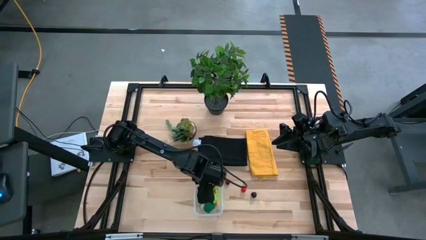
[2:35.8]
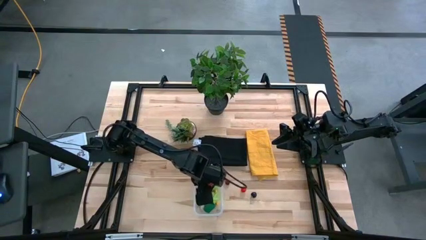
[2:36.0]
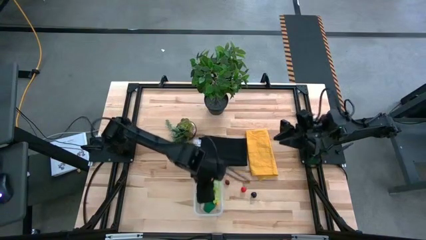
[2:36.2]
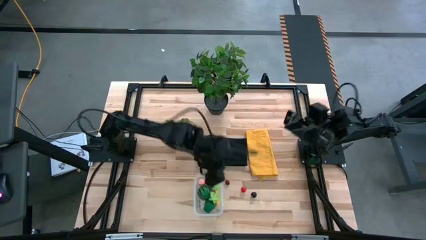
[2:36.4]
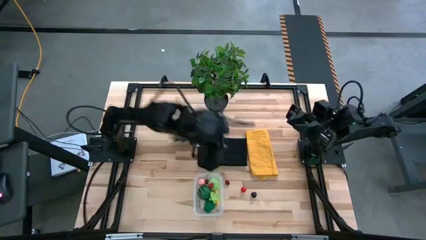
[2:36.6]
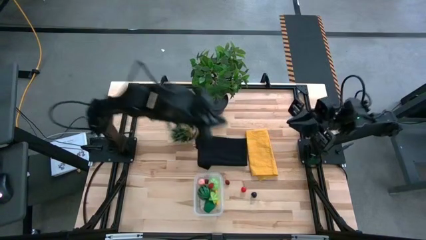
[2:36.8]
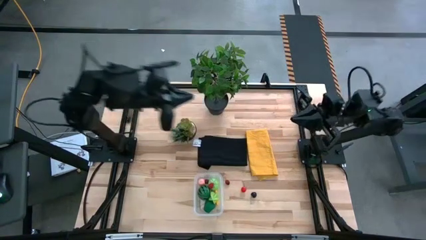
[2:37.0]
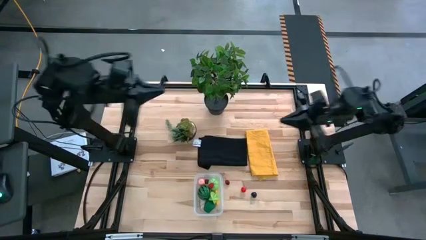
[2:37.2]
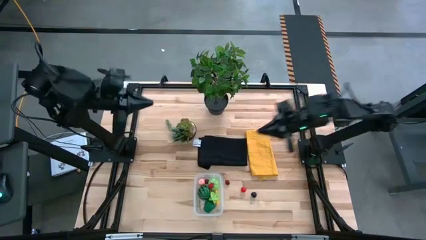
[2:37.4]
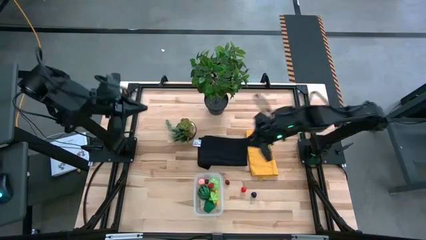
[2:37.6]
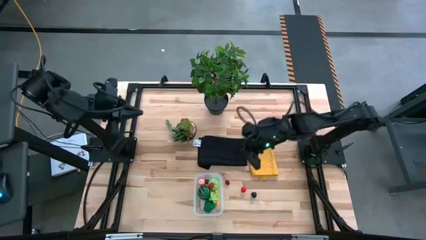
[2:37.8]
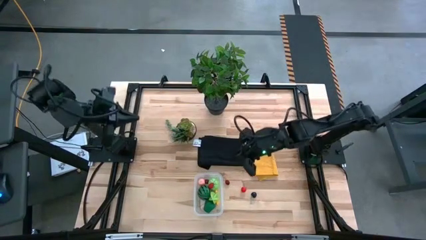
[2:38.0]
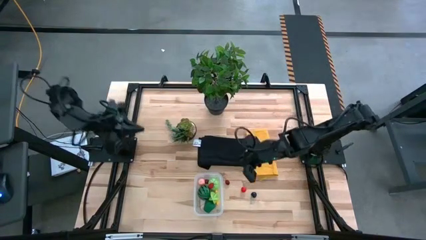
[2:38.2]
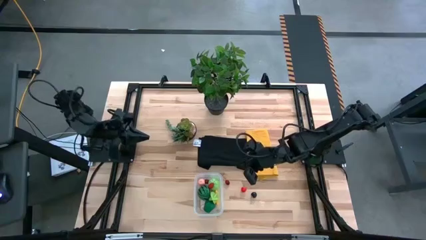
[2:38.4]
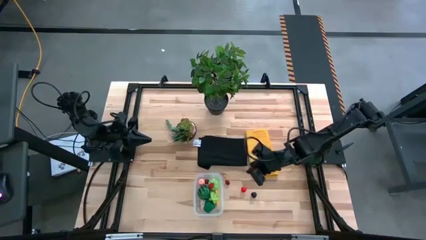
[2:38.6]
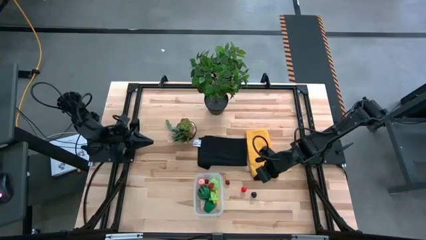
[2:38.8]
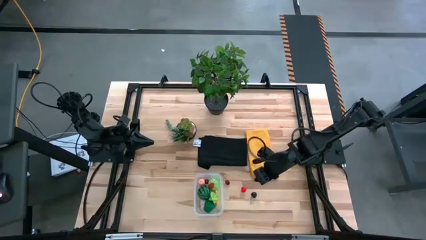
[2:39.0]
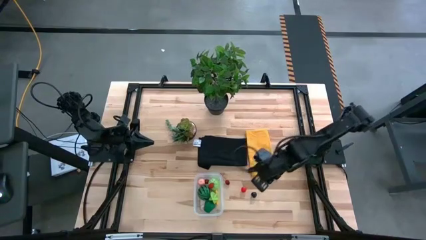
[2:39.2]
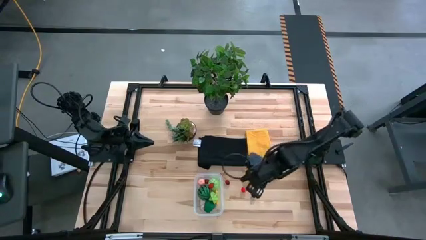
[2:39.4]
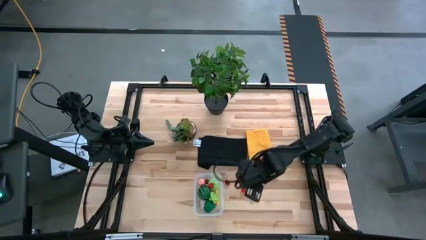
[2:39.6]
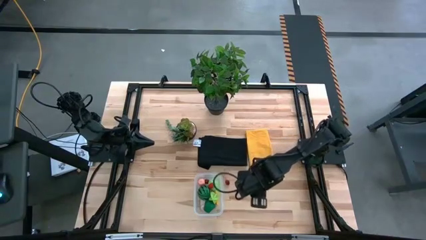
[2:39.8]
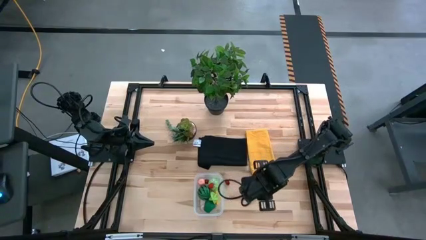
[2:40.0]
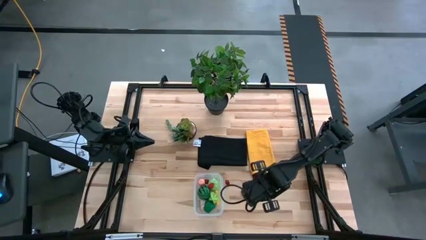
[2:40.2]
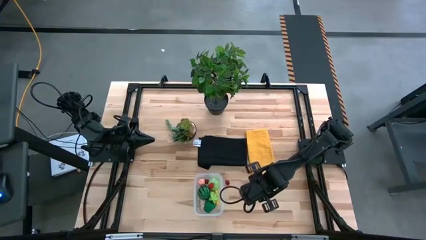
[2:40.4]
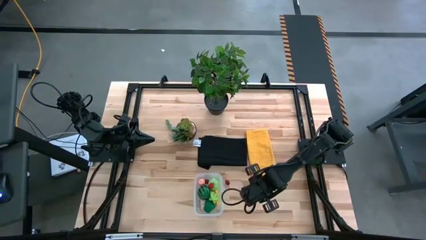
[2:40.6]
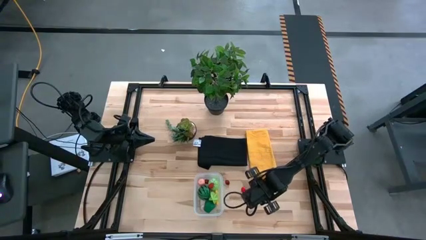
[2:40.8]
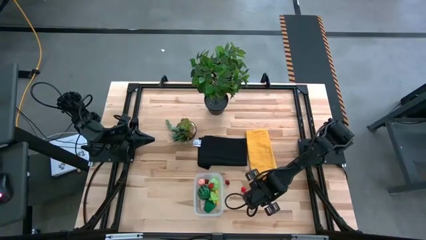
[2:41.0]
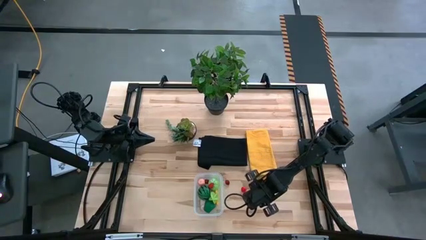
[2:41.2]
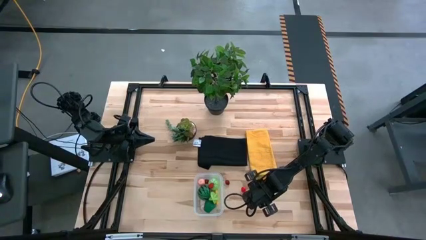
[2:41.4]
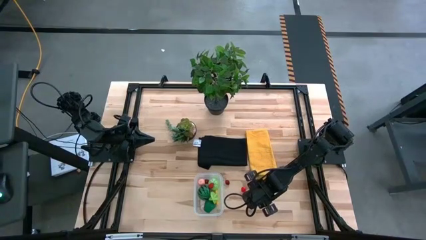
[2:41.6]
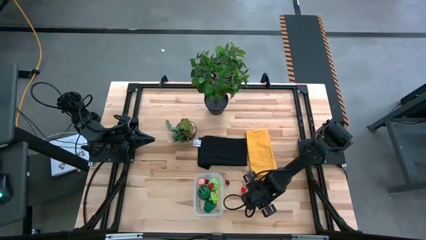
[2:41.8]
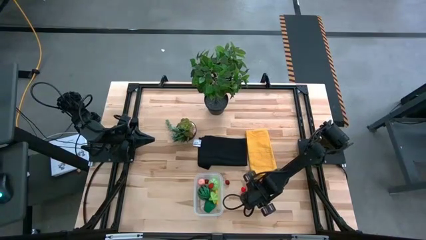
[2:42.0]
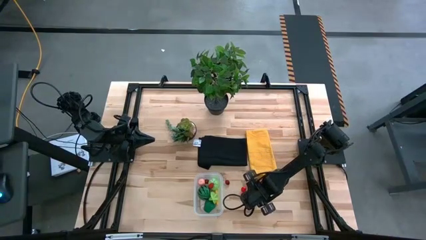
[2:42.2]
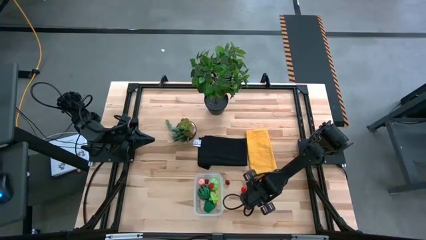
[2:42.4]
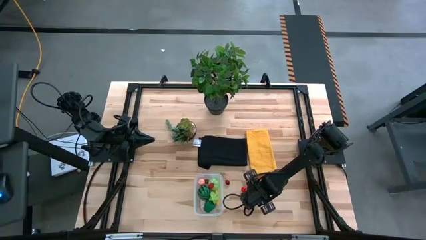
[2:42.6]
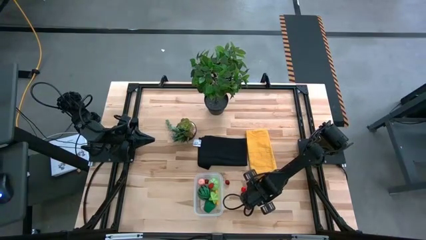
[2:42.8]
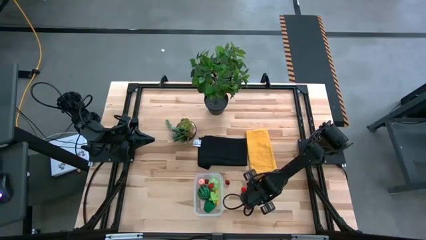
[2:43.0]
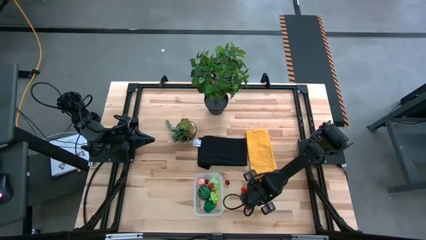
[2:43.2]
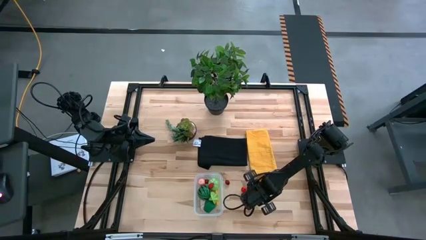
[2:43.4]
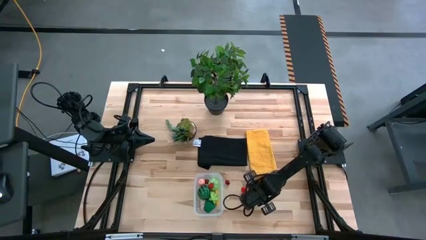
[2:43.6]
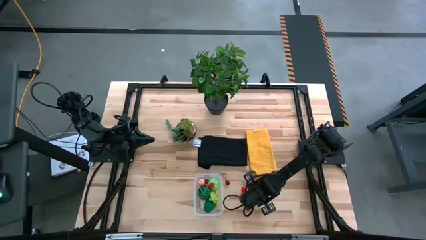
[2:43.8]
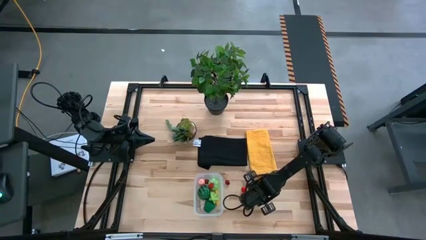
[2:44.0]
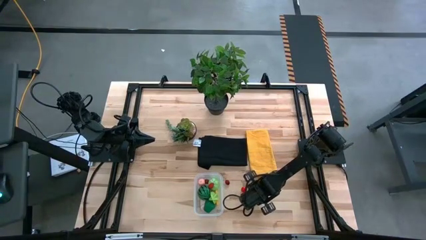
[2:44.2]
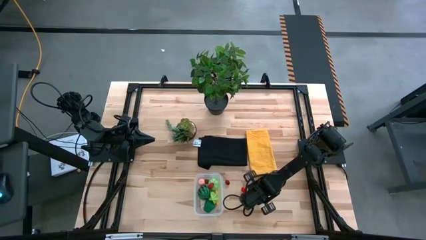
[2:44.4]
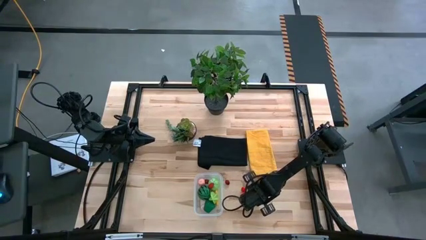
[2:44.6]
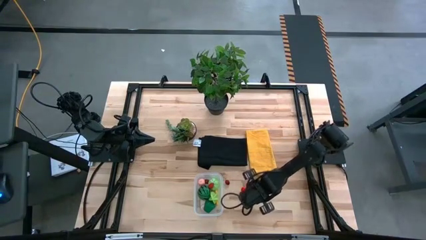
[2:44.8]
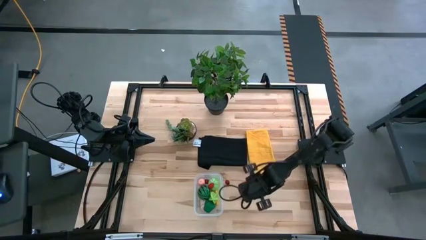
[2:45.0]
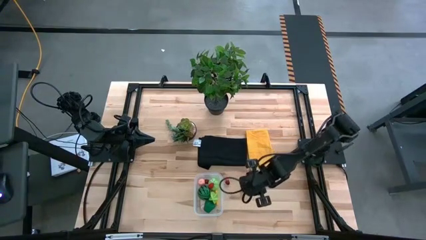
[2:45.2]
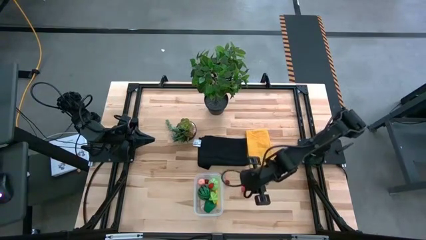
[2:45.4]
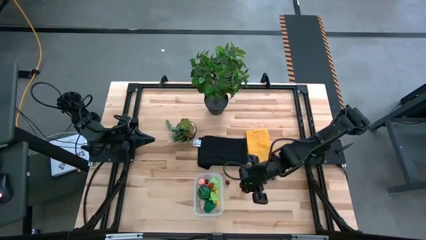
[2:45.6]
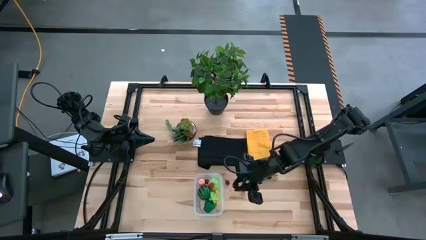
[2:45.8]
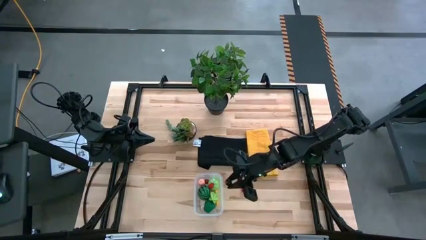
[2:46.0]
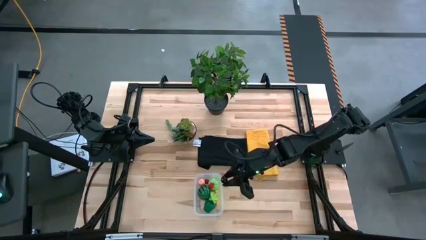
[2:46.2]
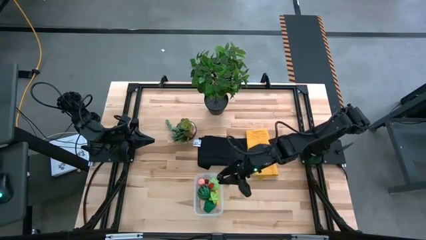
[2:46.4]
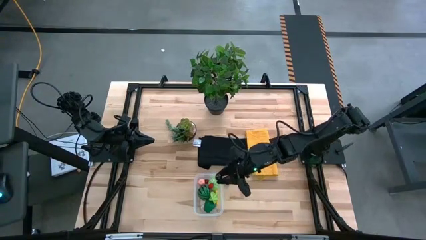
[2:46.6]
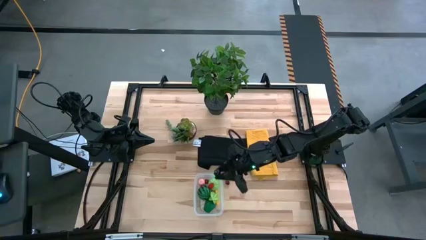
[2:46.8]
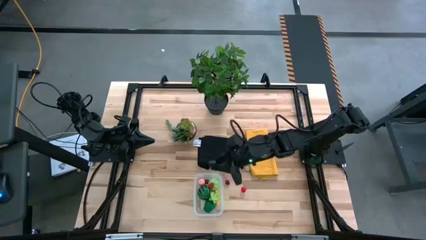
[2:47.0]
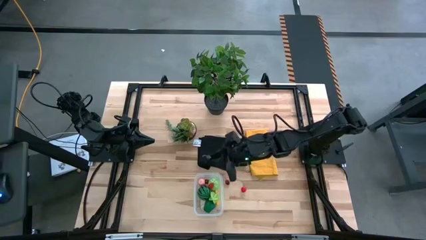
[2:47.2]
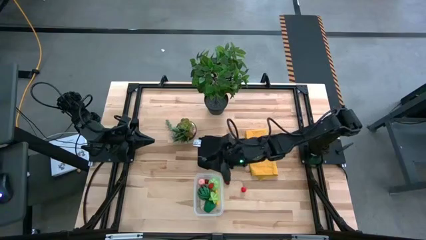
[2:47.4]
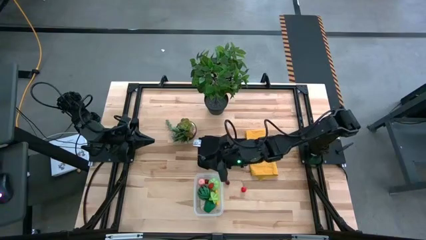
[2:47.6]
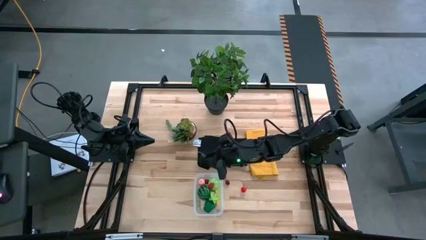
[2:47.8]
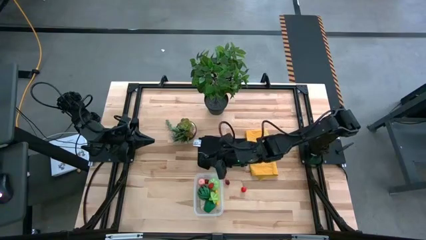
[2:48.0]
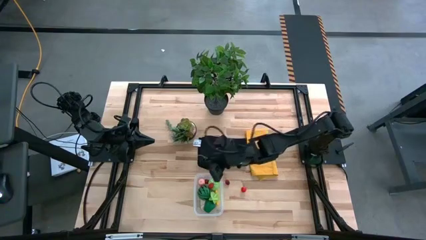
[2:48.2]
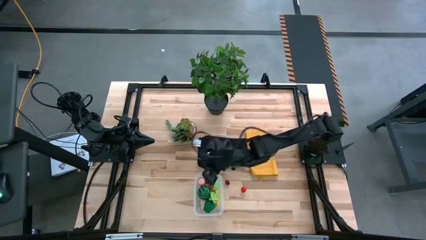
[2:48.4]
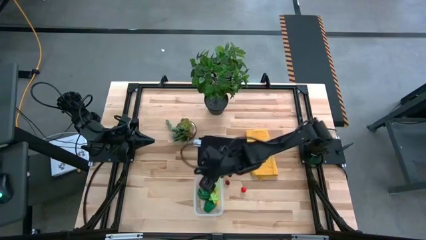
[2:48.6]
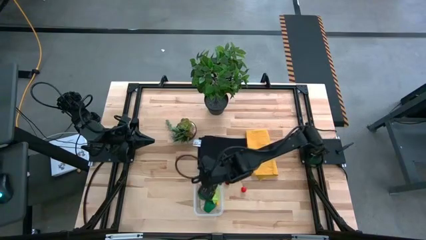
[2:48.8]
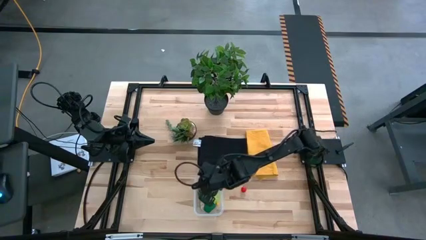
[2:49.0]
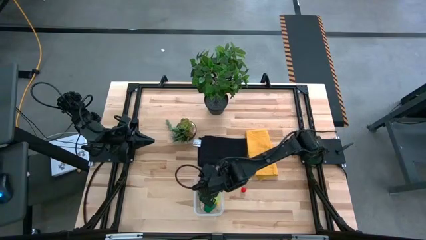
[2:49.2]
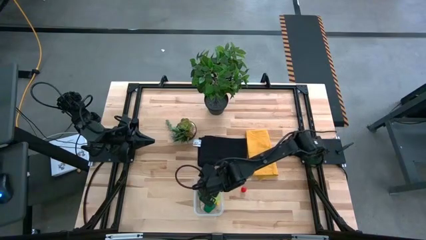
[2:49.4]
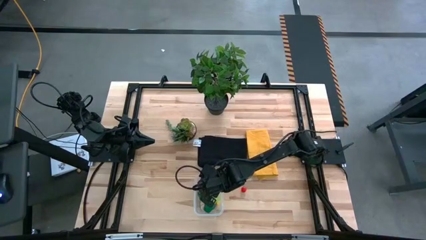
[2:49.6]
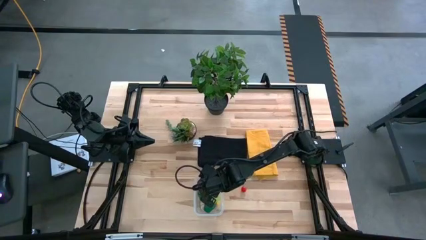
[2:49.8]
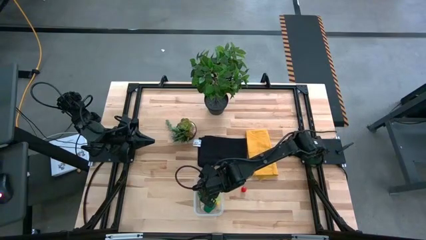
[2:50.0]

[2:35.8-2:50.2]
Task: Pick and placing Produce into tupperware
Put the black cherry into the bin
